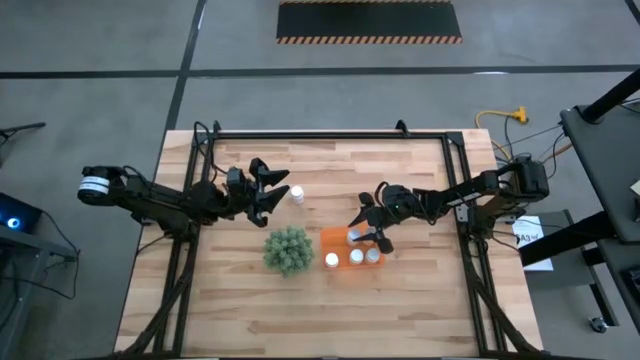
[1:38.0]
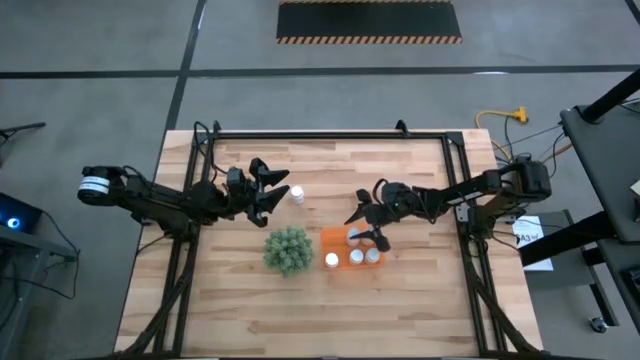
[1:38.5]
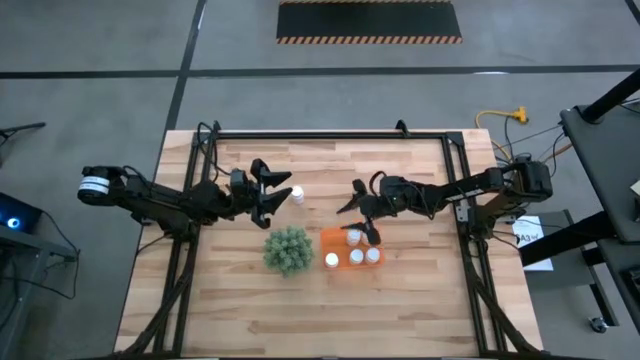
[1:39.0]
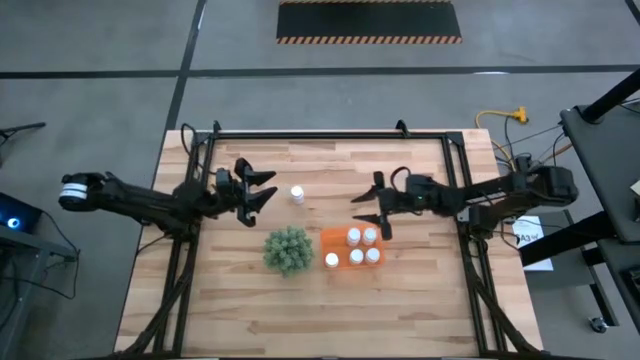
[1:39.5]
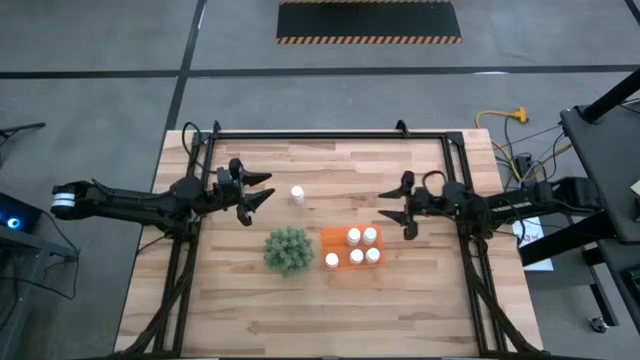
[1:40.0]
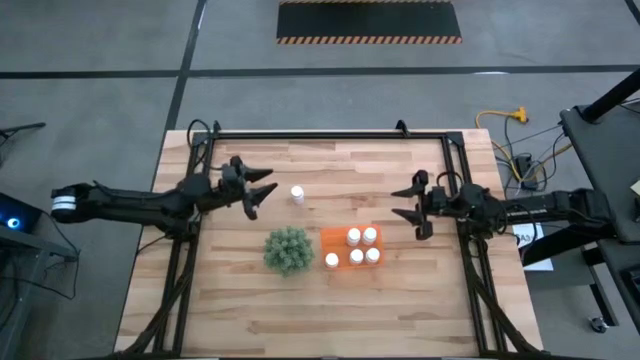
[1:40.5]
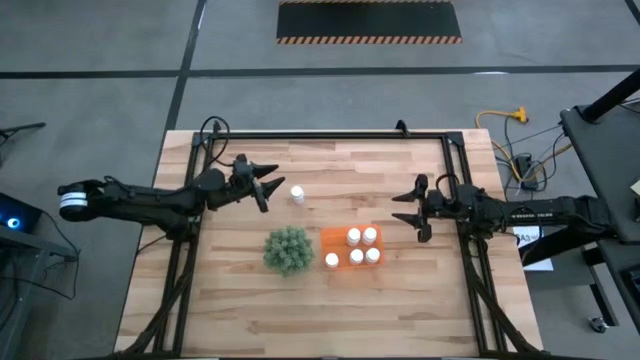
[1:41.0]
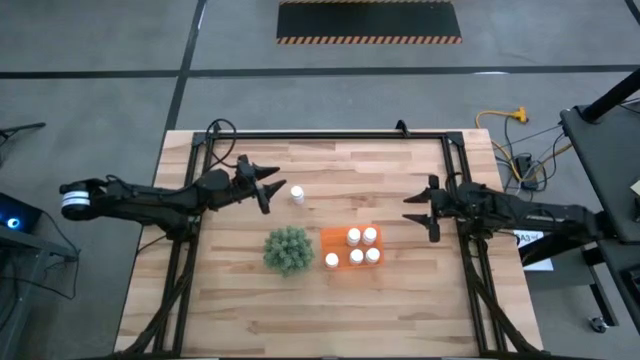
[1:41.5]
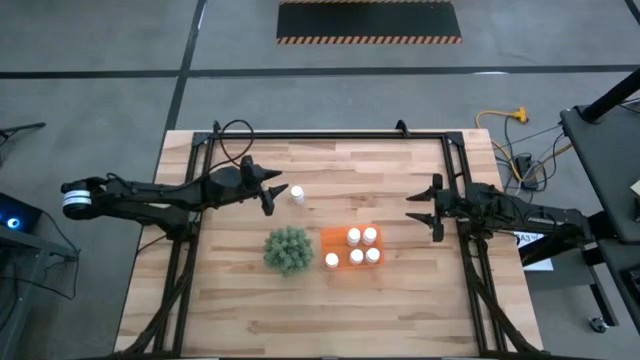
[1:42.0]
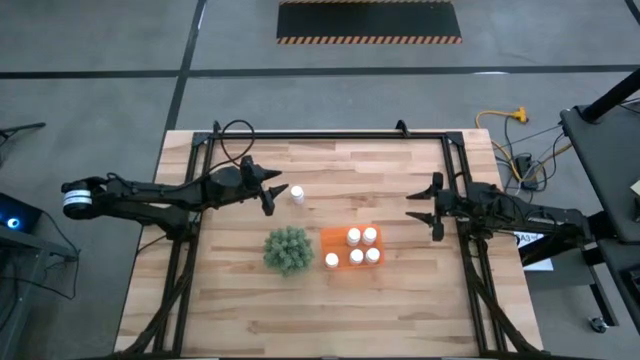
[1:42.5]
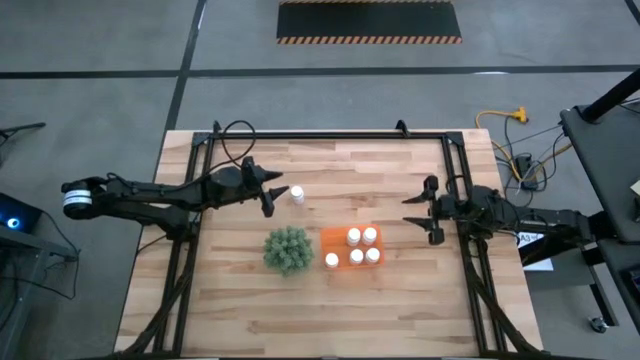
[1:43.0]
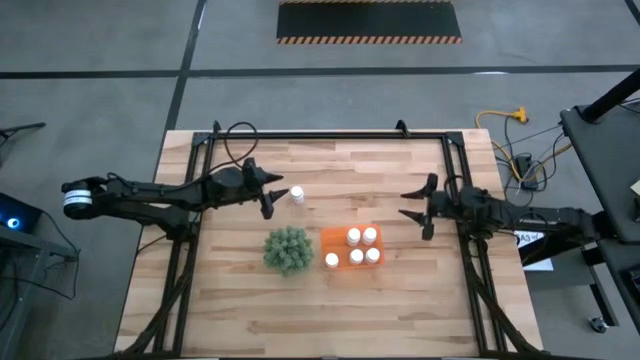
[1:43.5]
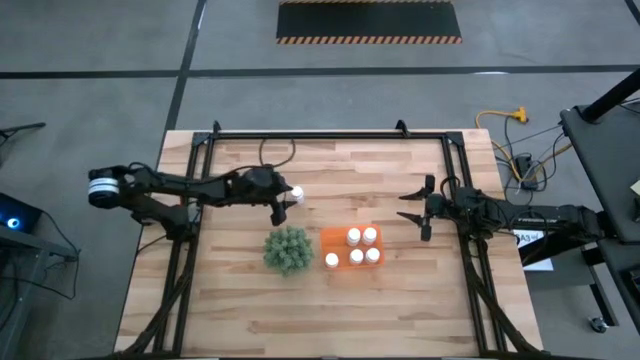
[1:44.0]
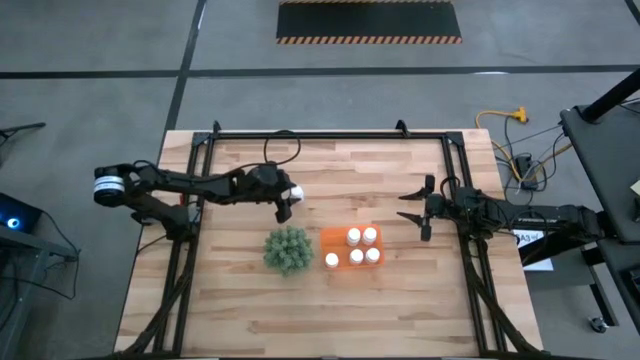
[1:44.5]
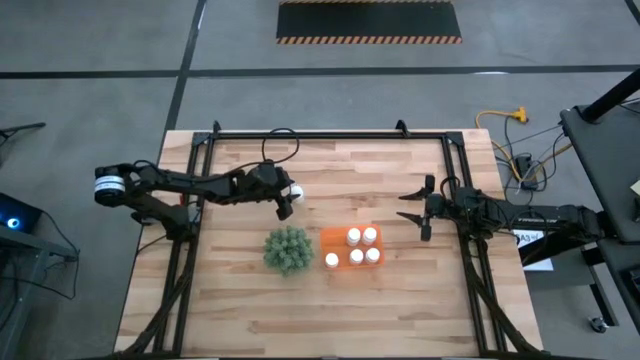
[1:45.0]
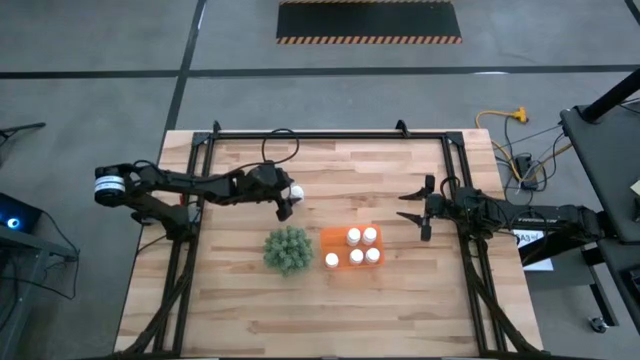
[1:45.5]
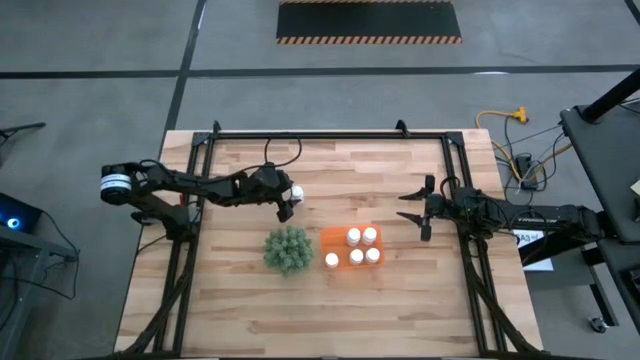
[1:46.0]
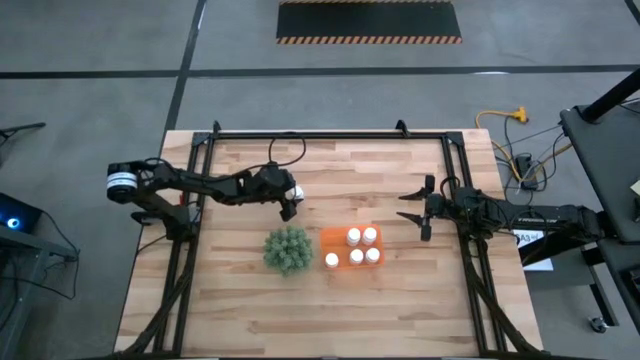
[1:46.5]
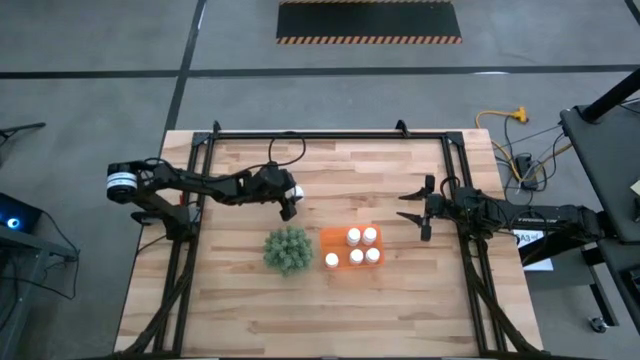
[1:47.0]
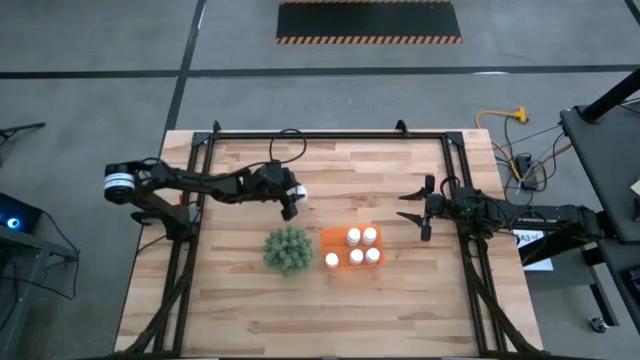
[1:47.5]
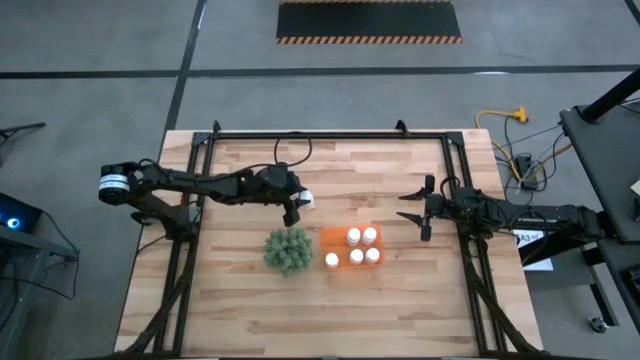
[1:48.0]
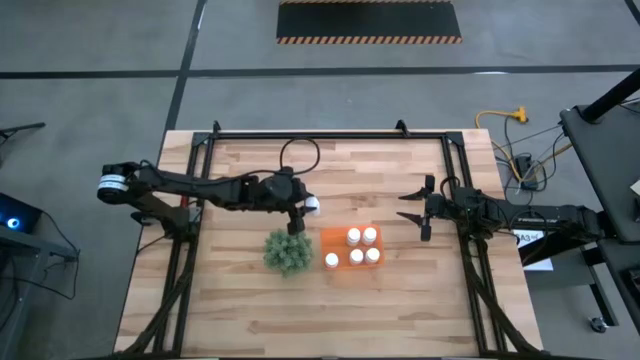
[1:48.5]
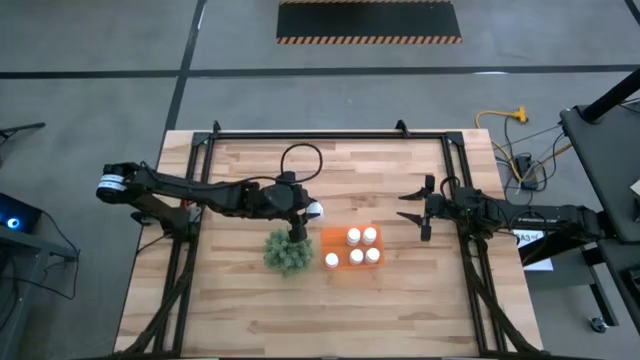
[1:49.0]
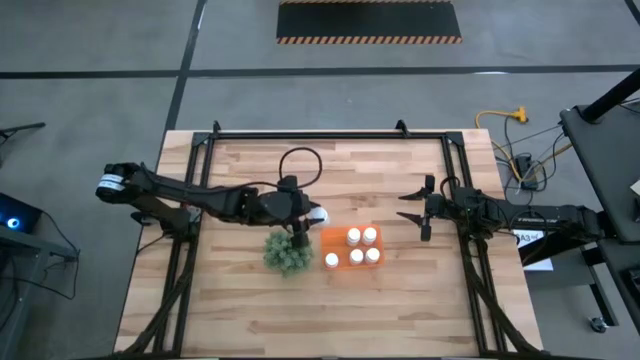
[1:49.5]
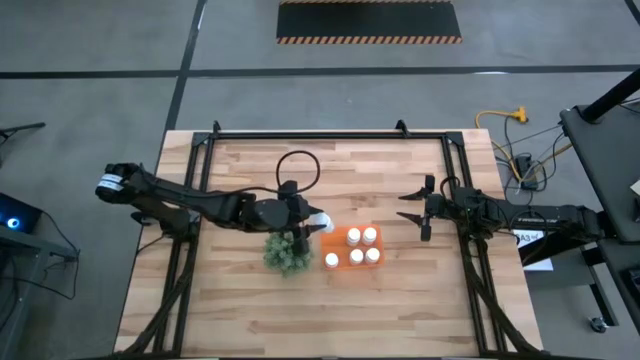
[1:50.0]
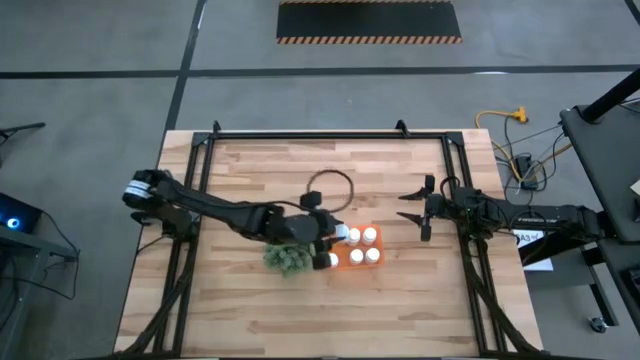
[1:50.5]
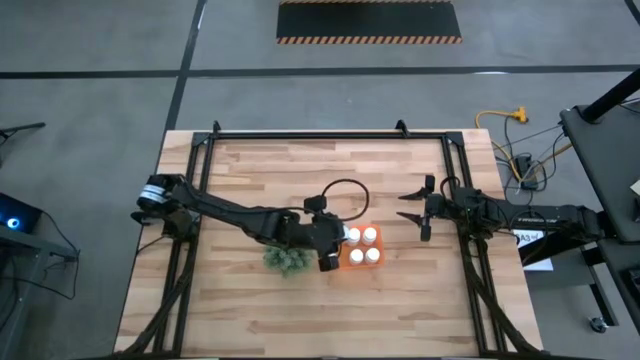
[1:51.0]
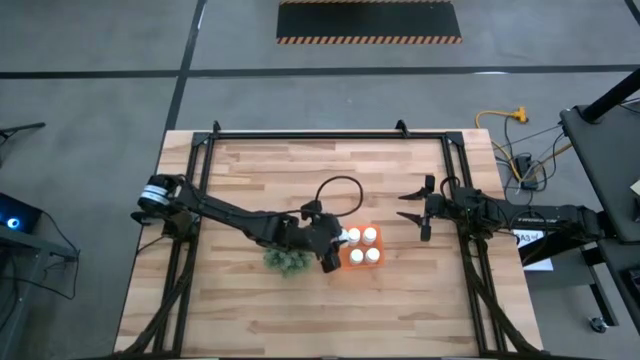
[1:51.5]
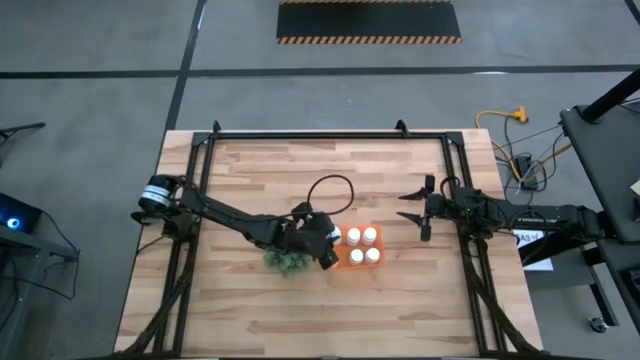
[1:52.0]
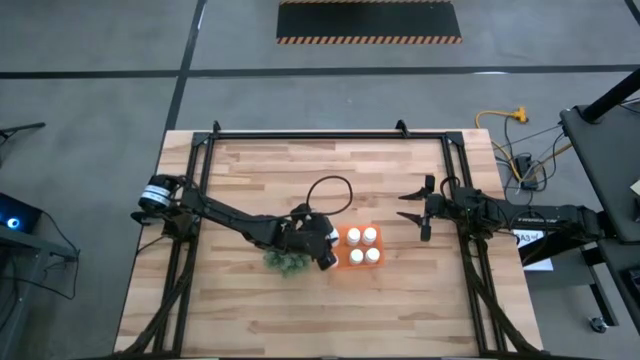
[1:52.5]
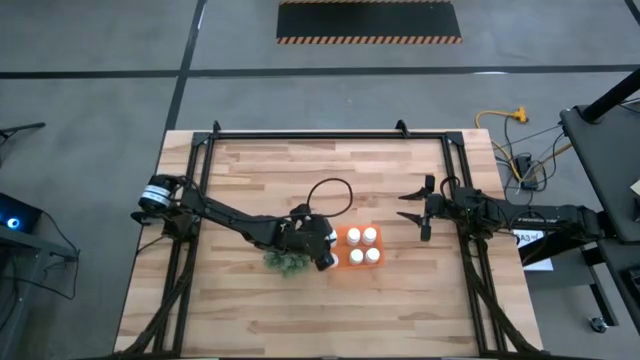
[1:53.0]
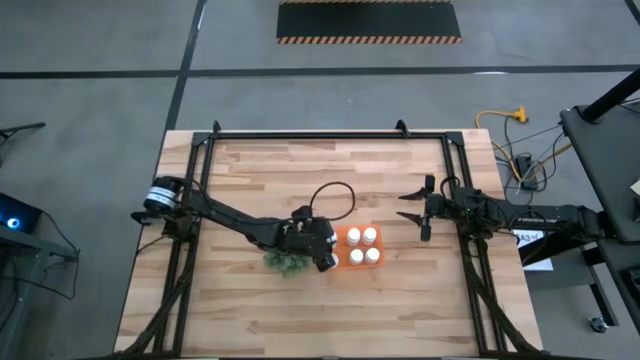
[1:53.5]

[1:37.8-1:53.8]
Task: Pick and place pill bottles into a basket
Put the white pill bottle into the orange bin

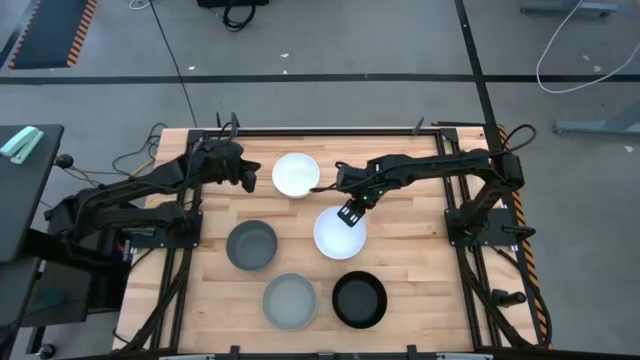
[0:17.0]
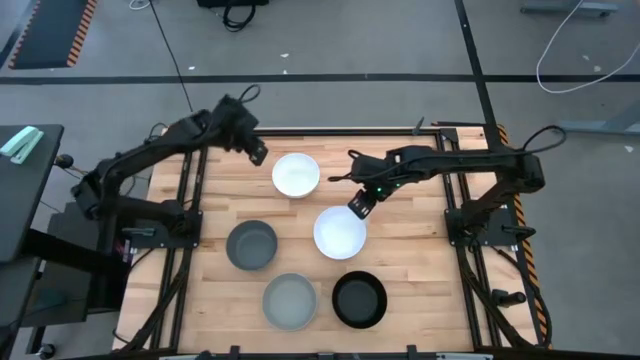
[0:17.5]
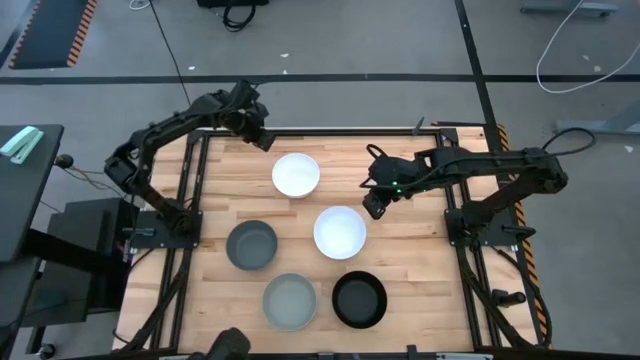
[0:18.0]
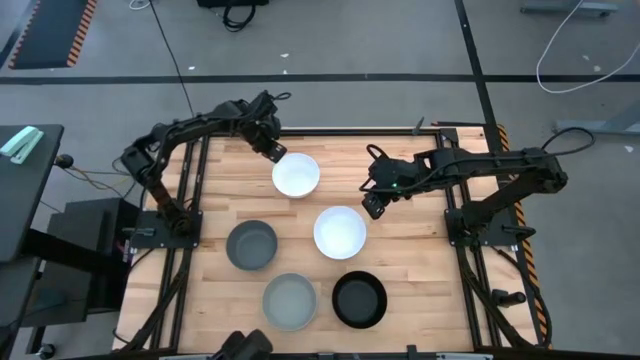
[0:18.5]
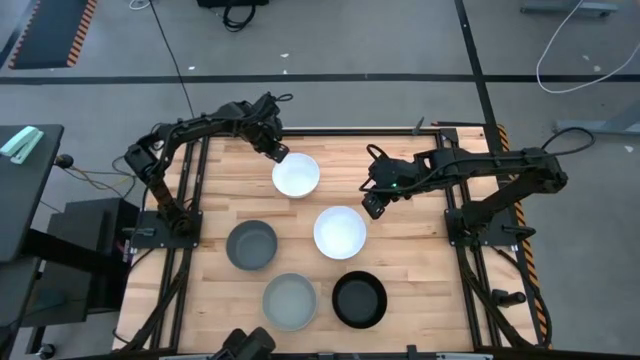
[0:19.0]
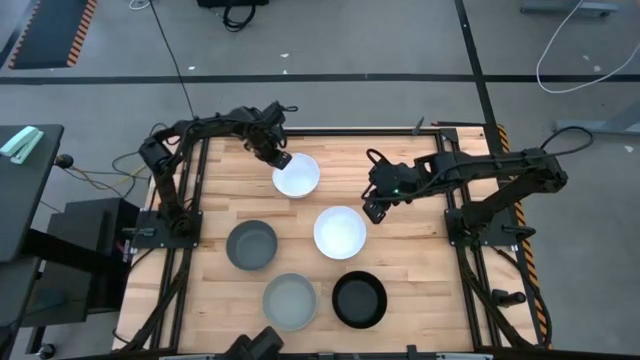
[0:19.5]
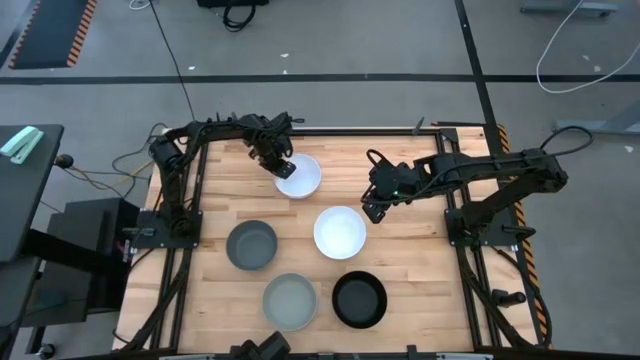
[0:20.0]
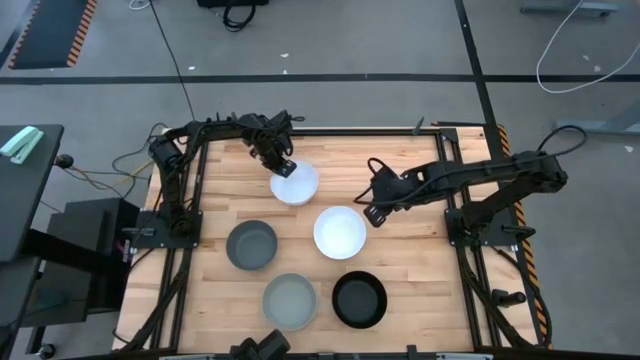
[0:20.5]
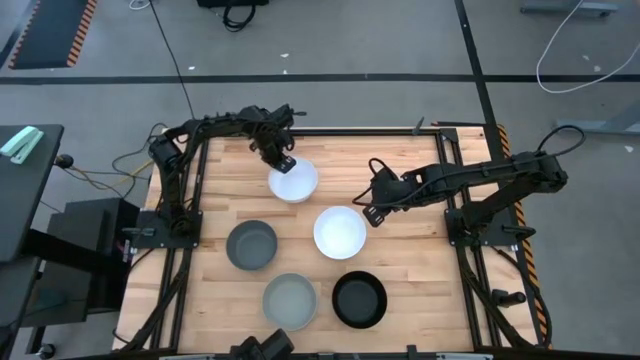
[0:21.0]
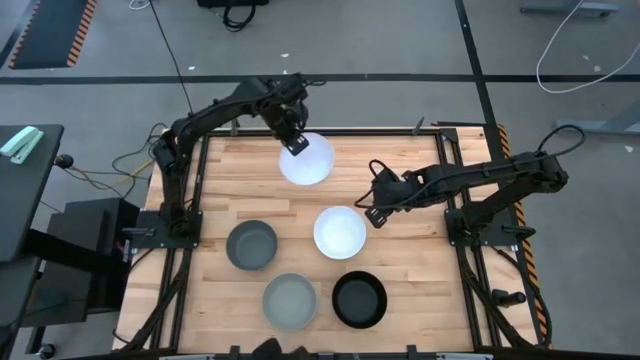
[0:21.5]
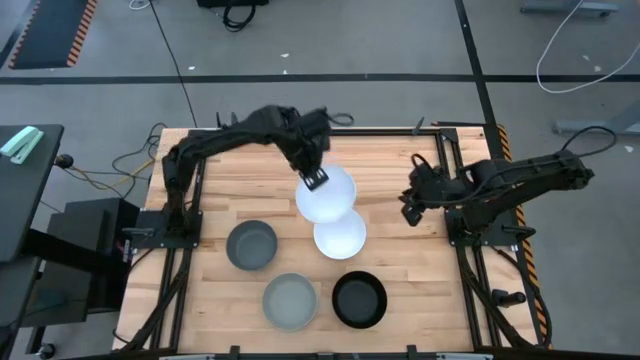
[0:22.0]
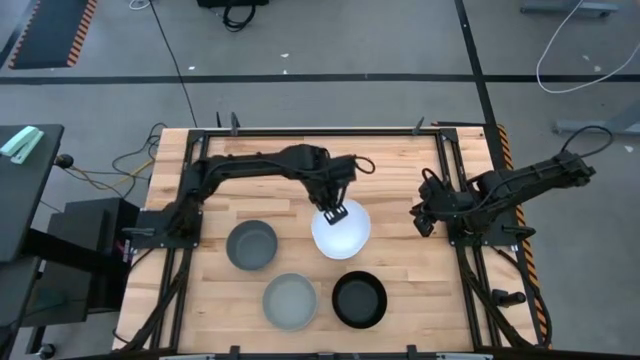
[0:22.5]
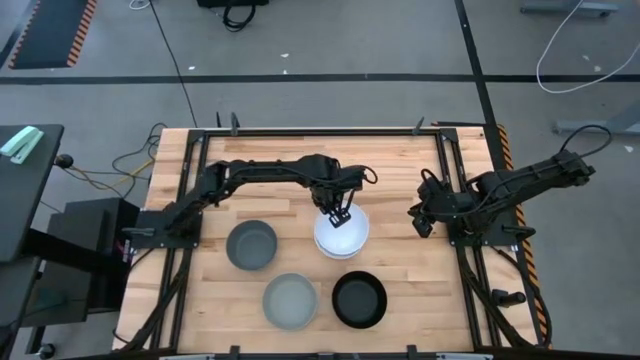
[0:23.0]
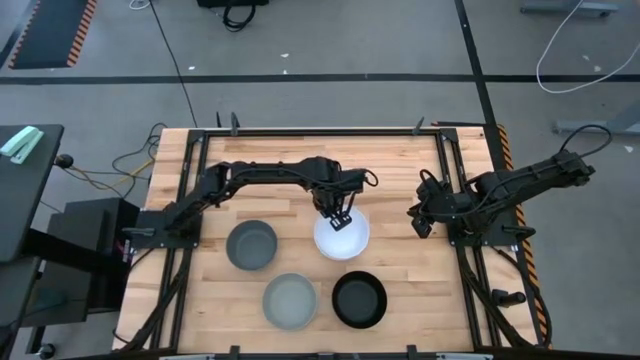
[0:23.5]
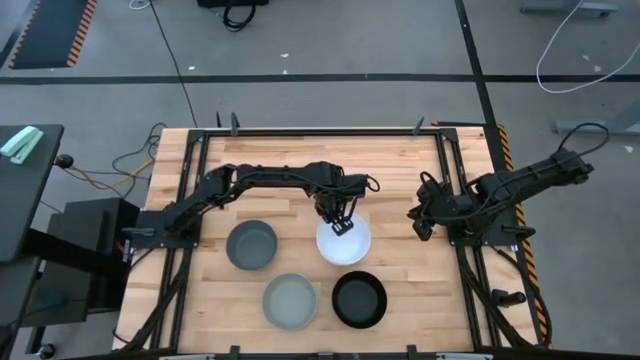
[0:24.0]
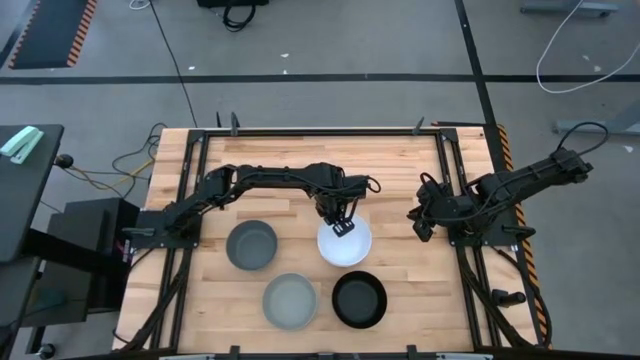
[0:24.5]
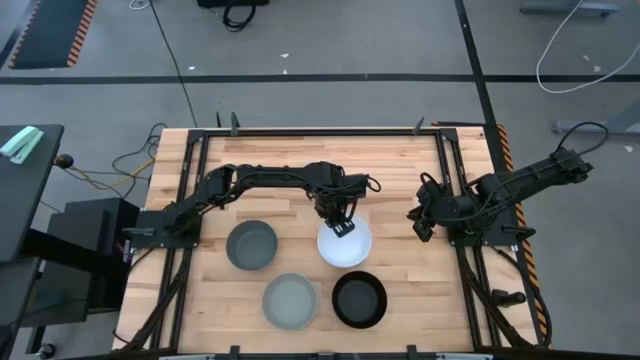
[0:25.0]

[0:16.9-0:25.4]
Task: Nest bowls inside each other
Stack the top white bowl on top of the bottom white bowl
